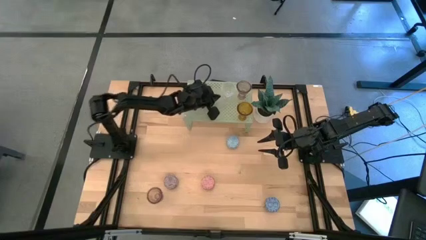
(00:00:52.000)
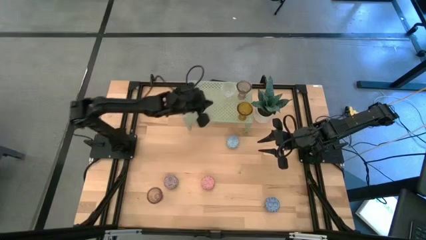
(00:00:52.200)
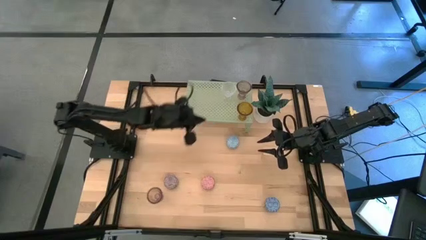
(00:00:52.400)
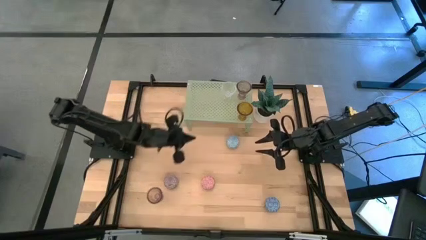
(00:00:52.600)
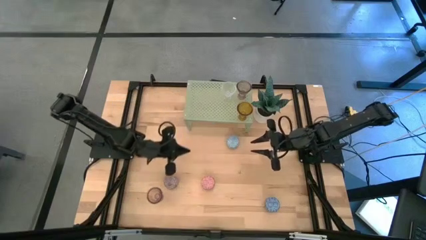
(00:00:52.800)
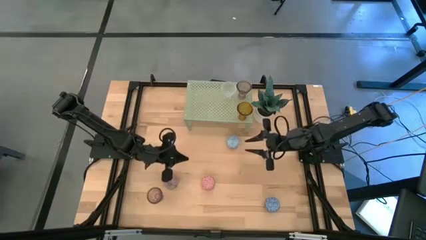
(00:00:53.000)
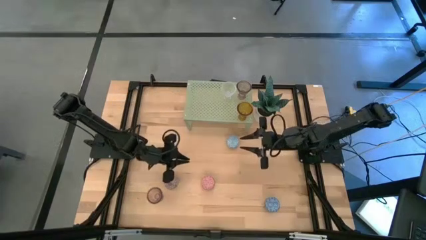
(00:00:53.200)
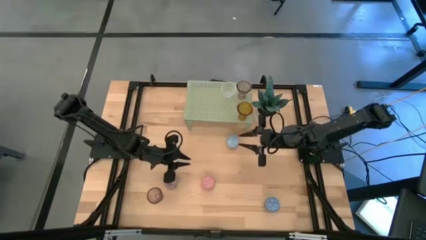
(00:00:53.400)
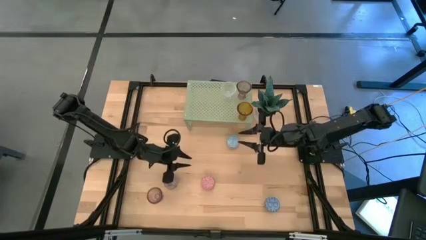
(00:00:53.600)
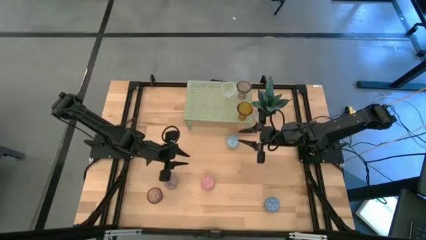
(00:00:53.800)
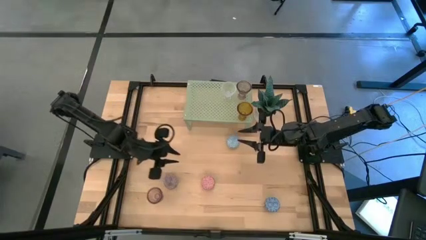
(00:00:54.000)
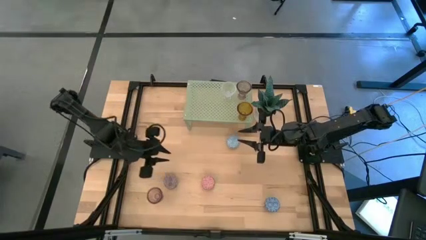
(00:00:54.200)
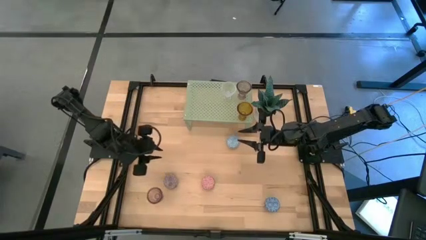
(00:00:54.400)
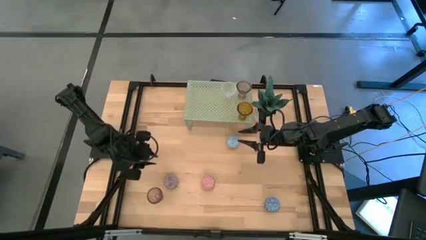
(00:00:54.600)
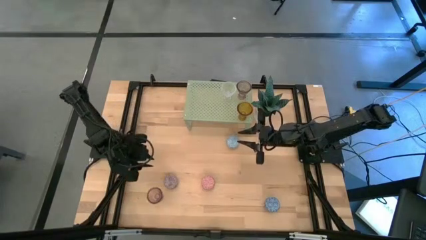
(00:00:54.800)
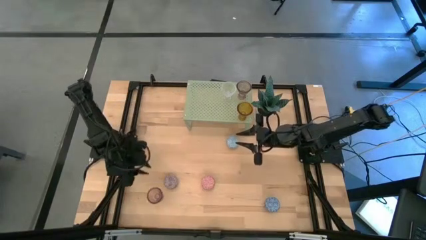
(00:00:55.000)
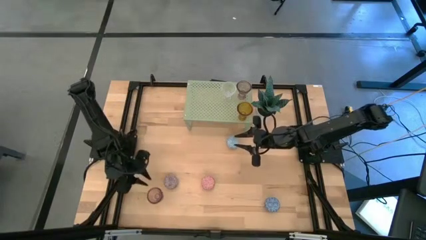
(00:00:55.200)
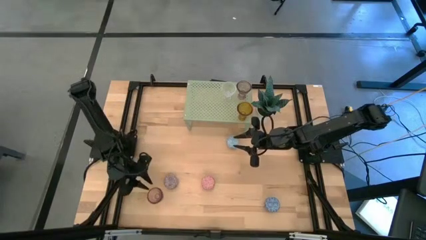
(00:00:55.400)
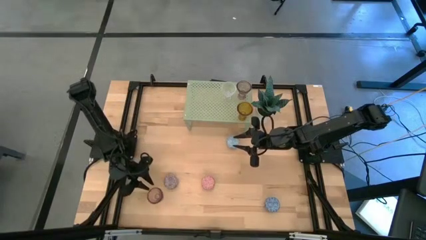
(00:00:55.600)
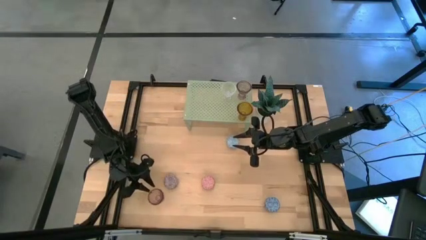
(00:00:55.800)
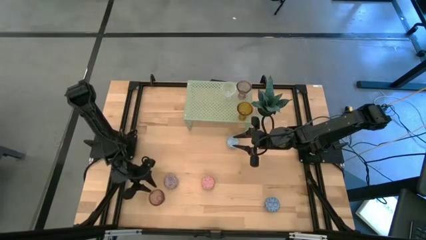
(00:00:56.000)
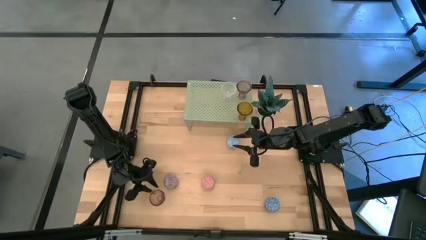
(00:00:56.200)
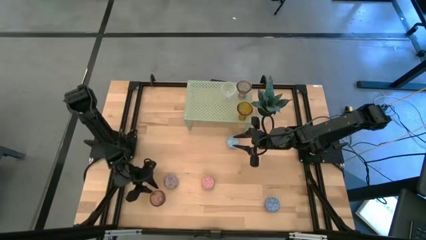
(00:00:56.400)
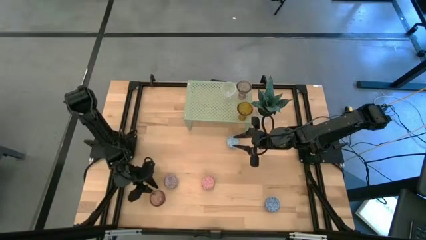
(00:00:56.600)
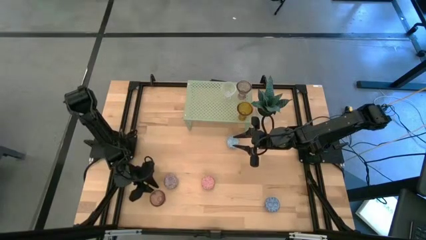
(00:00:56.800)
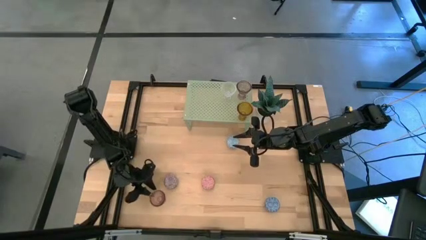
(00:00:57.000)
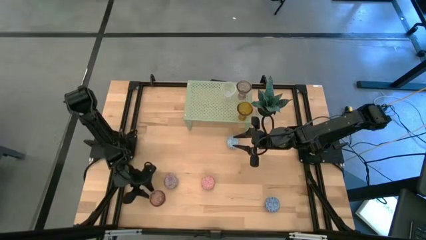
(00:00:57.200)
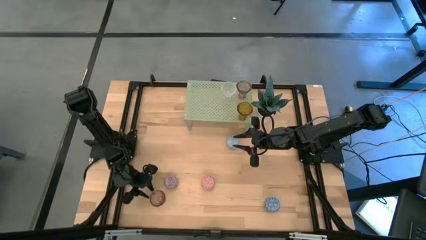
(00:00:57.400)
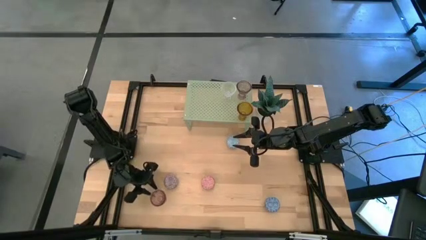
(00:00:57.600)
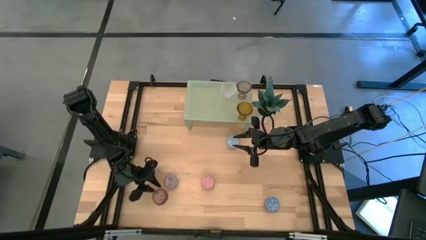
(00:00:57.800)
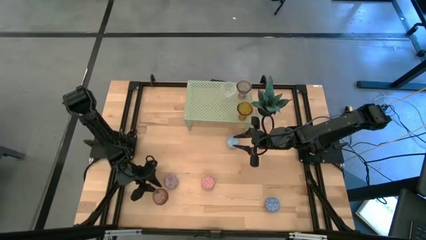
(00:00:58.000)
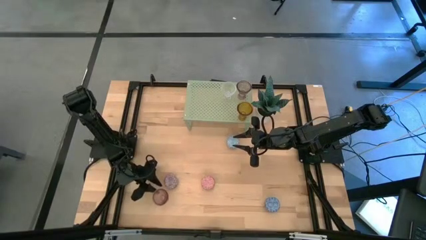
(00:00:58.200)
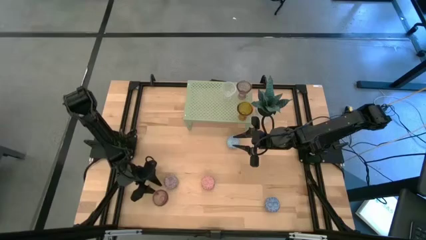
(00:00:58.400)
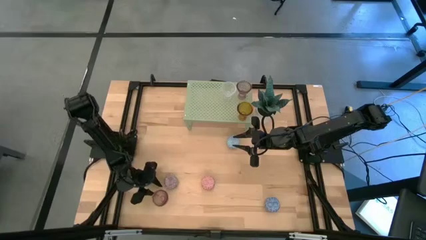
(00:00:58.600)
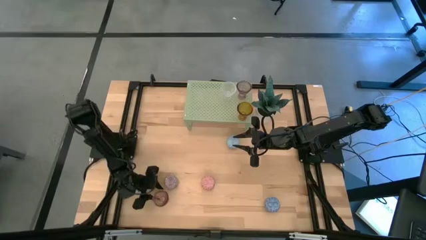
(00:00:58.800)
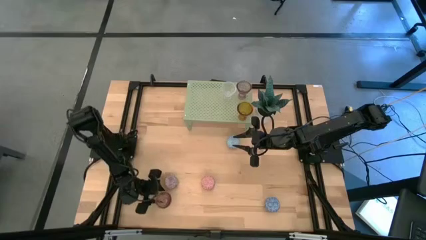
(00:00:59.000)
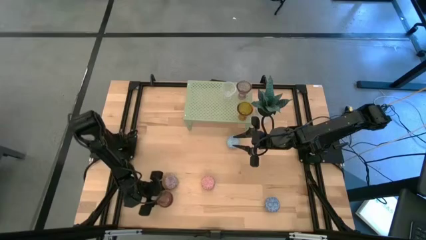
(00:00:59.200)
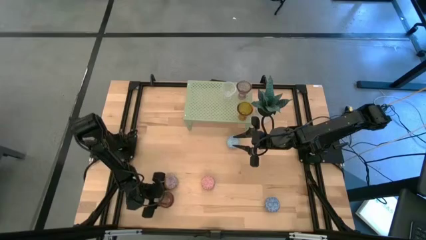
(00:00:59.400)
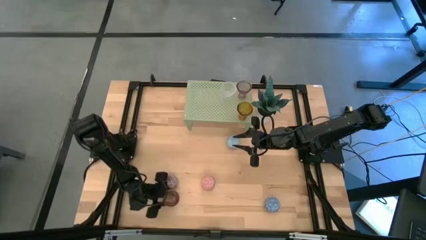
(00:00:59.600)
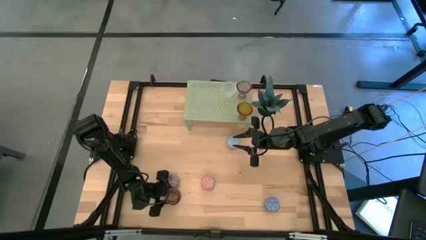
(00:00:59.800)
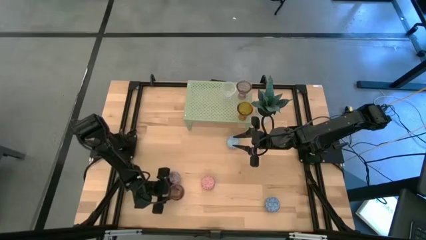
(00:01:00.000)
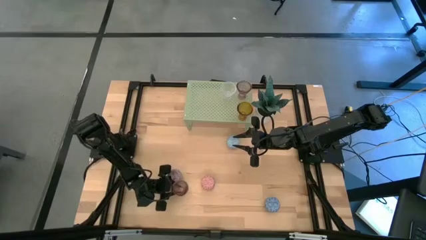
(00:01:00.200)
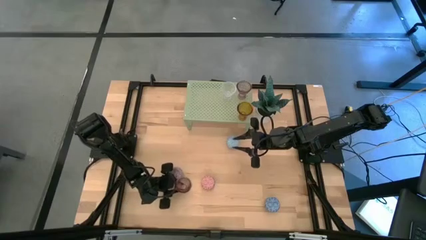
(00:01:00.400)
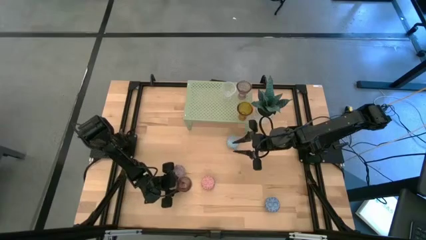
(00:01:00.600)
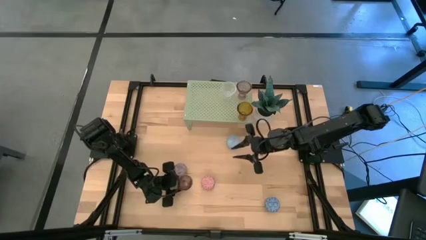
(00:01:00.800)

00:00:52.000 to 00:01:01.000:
Task: Pick & Place candle stick holders
Align the purple glass candle holder with the transparent glass candle holder on the shelf

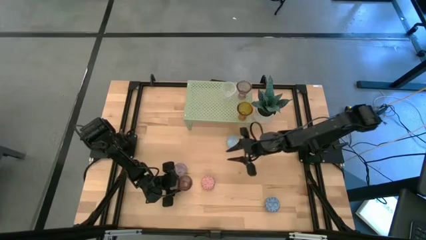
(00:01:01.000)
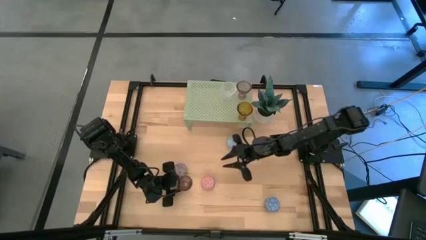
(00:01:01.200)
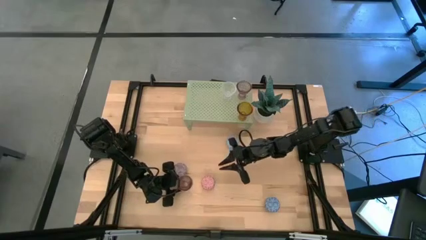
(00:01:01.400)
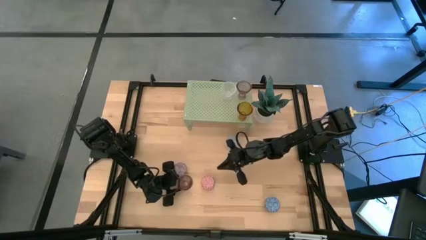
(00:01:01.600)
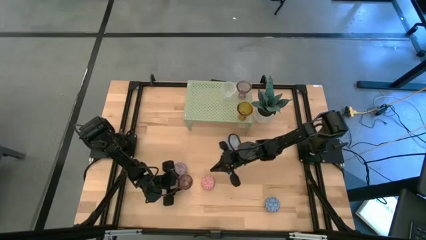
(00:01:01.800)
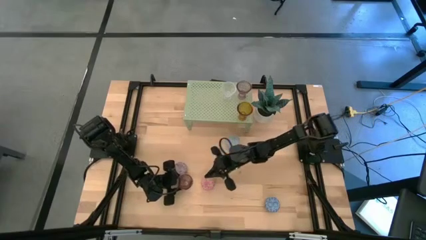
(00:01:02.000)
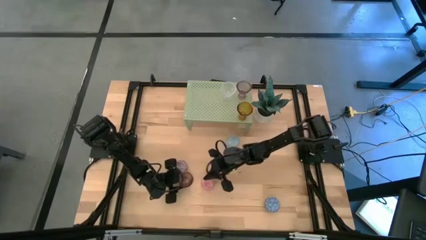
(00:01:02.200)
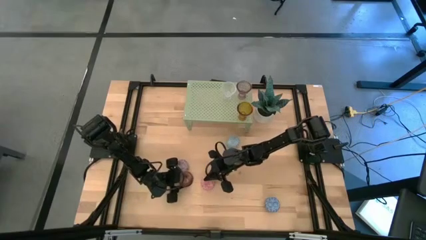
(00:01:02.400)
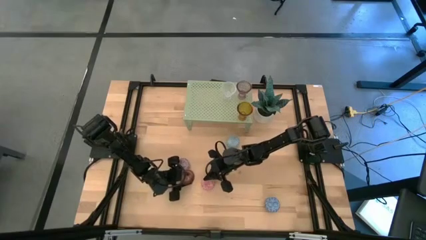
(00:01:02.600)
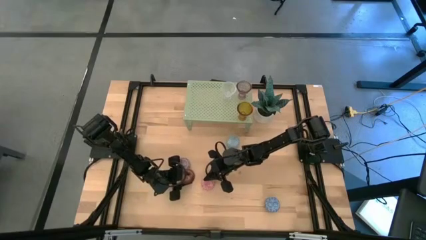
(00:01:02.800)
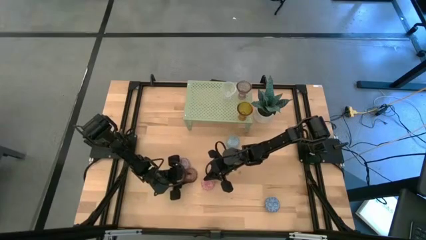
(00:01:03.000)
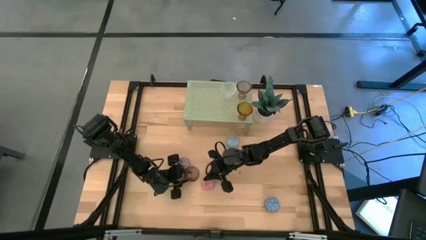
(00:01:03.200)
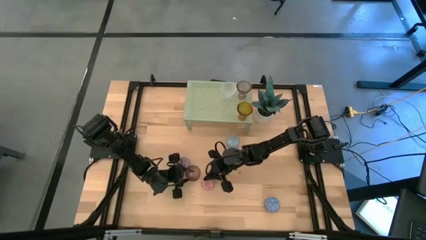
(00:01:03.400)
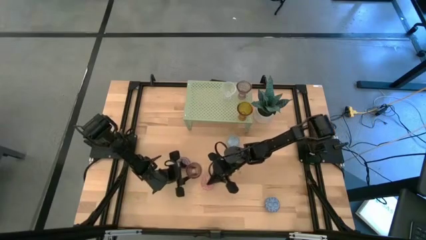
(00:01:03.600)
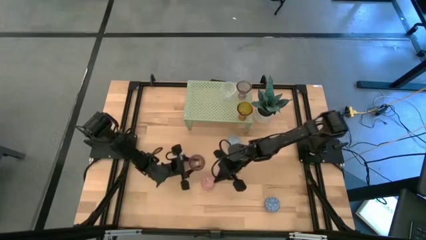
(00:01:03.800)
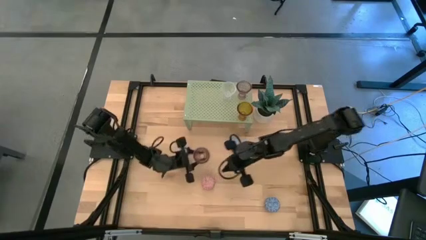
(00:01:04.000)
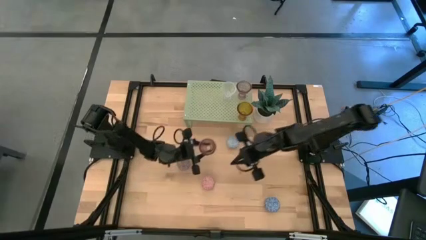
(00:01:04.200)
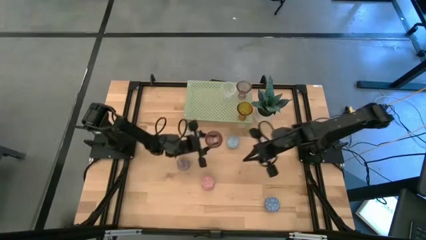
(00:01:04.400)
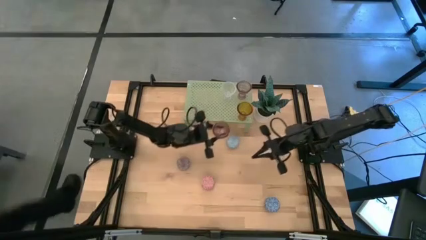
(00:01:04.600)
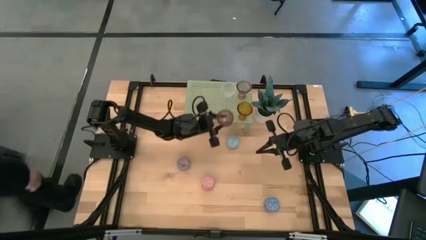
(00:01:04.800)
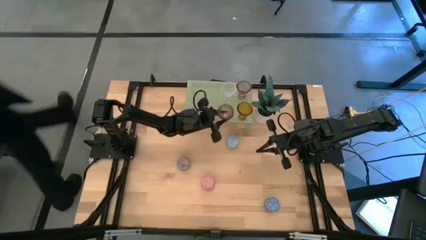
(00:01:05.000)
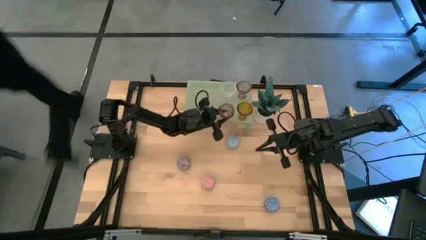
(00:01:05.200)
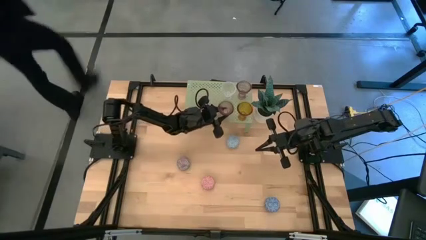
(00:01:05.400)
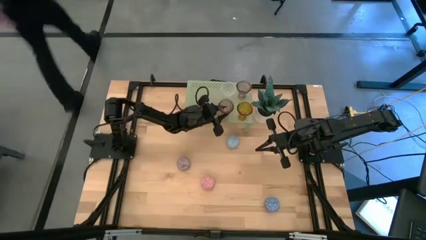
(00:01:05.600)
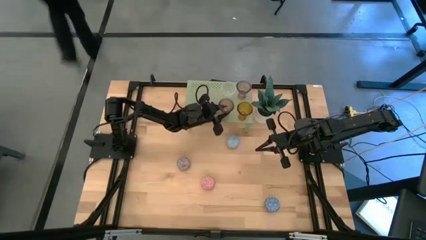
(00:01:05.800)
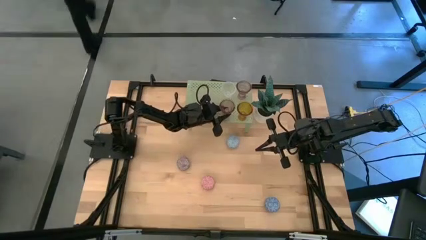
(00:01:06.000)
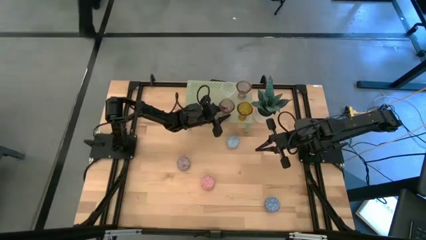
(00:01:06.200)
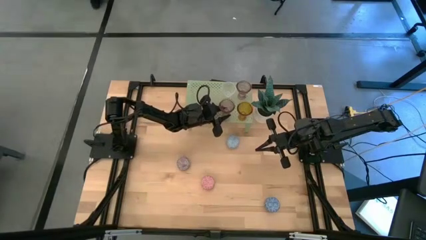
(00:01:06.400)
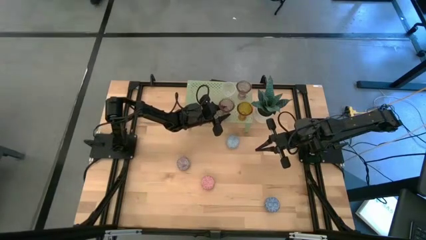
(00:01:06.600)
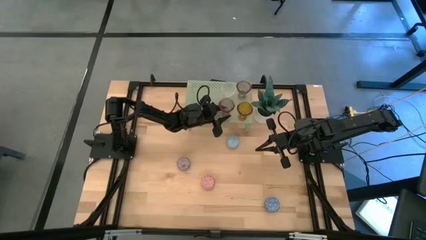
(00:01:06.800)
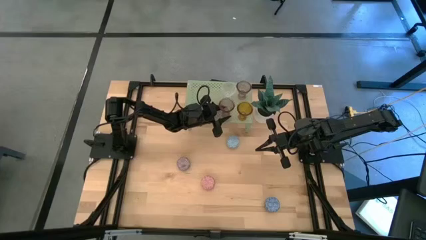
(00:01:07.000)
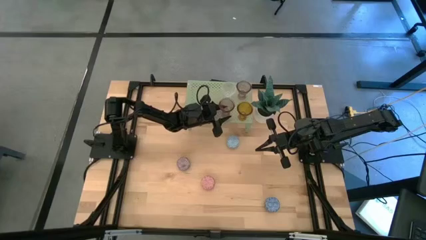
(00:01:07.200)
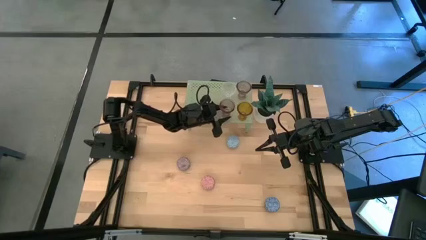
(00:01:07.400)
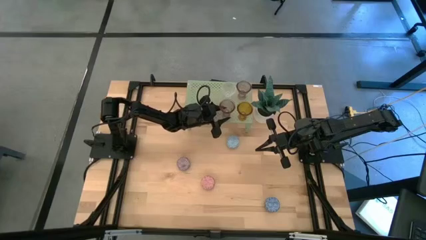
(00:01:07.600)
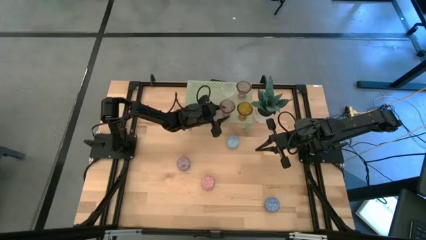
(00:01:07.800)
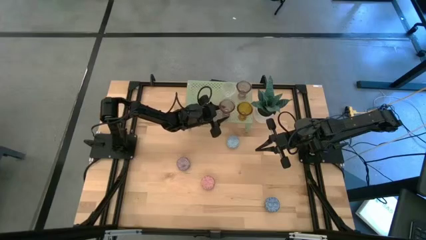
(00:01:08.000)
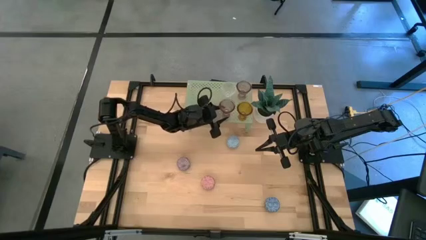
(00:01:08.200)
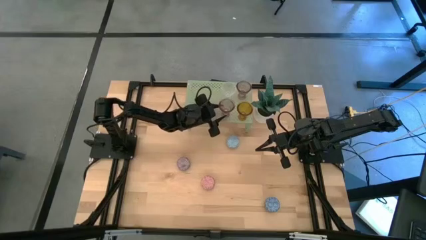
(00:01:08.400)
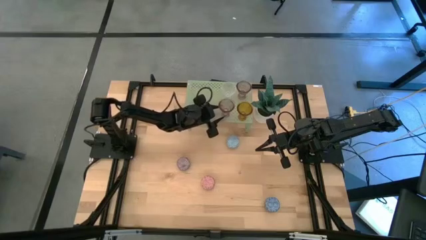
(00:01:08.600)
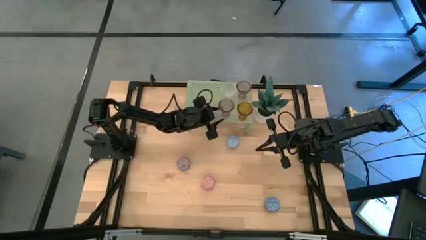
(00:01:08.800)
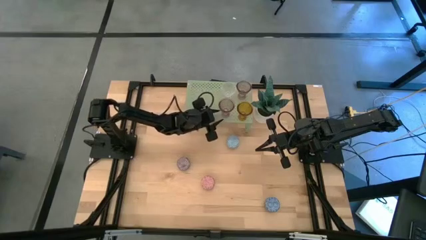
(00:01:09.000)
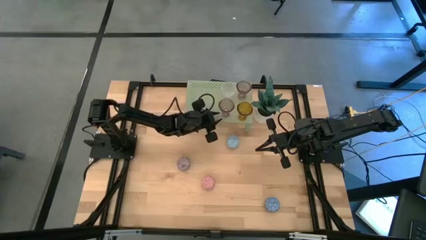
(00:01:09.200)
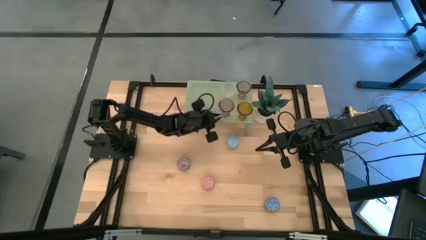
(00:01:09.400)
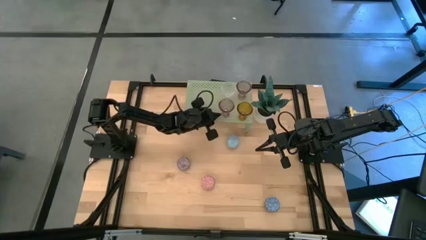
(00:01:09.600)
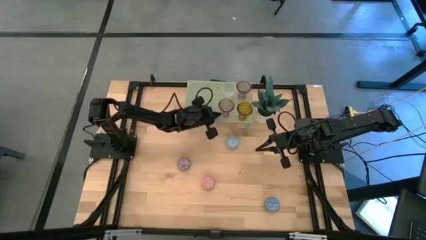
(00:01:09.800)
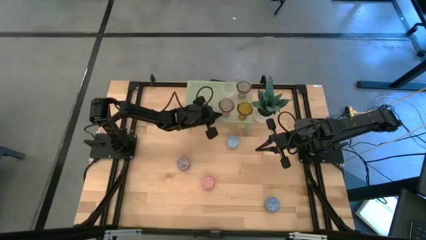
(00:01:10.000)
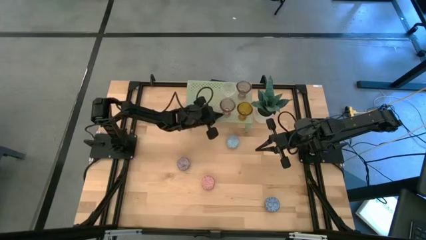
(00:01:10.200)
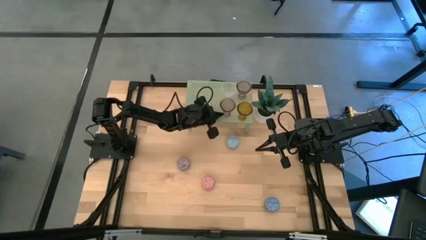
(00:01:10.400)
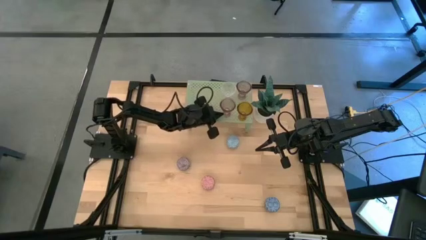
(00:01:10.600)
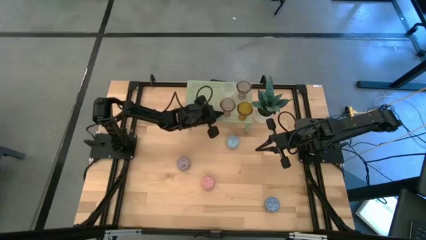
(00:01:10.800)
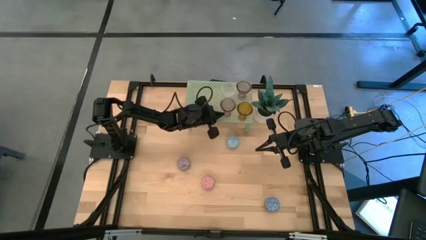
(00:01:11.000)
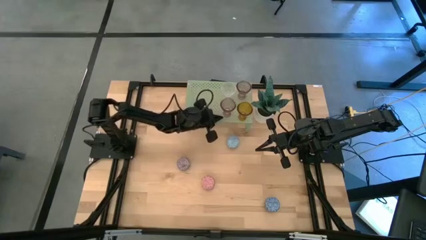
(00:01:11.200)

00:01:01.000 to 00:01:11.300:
Align the purple glass candle holder with the transparent glass candle holder on the shelf
